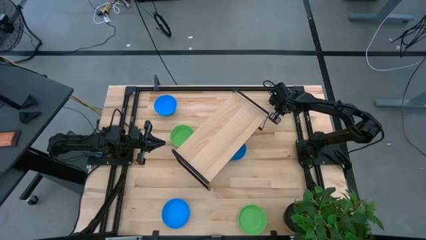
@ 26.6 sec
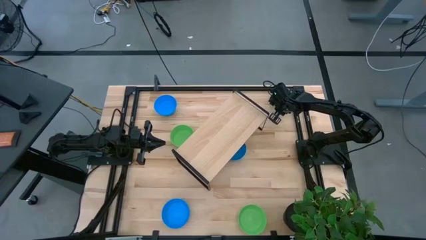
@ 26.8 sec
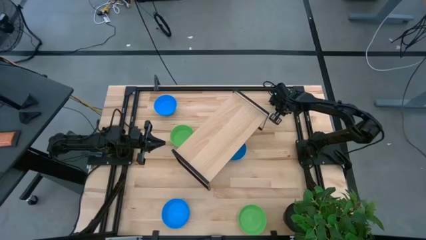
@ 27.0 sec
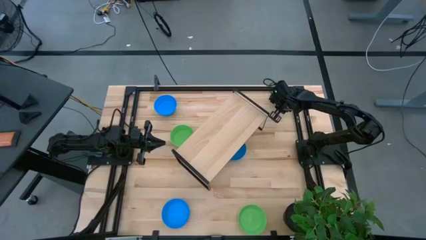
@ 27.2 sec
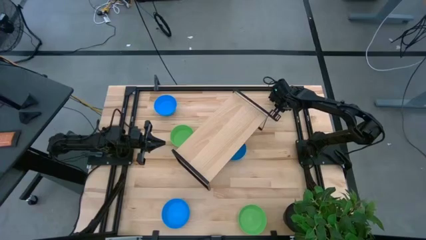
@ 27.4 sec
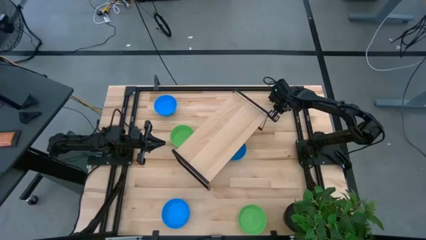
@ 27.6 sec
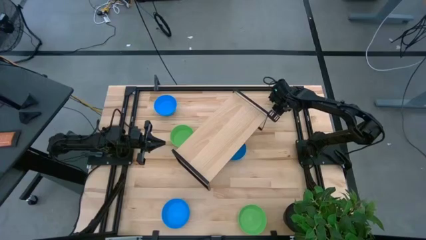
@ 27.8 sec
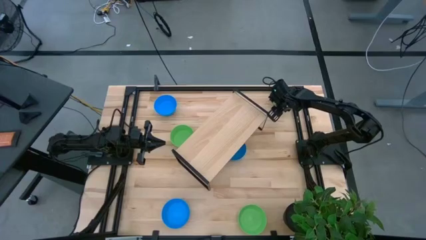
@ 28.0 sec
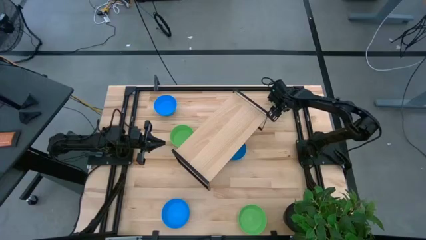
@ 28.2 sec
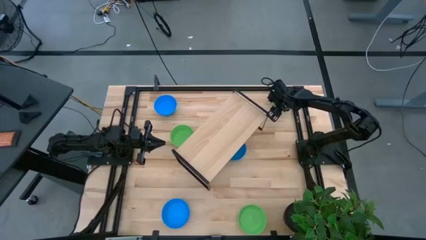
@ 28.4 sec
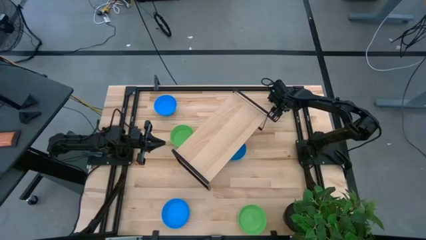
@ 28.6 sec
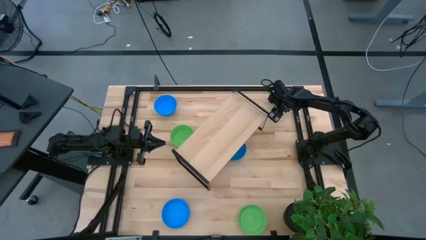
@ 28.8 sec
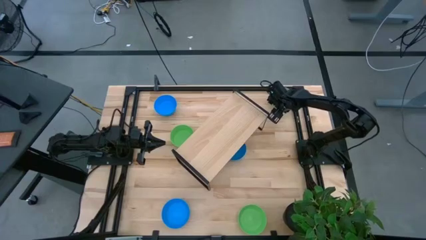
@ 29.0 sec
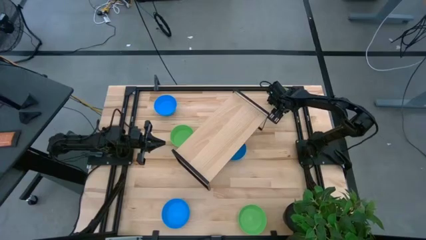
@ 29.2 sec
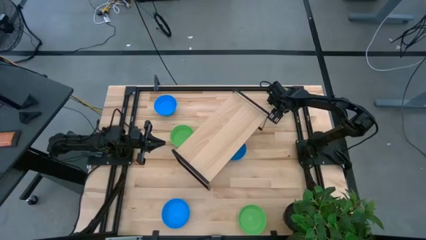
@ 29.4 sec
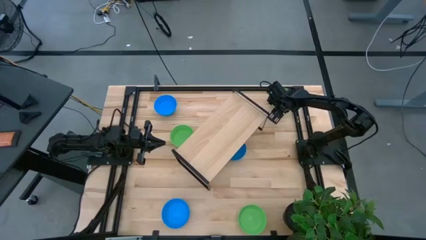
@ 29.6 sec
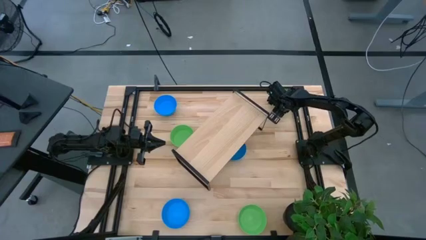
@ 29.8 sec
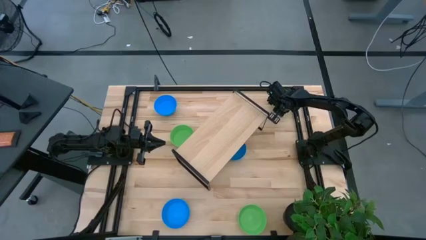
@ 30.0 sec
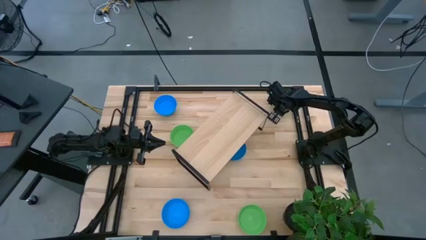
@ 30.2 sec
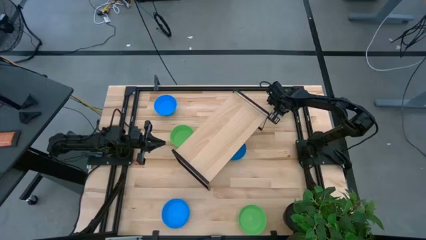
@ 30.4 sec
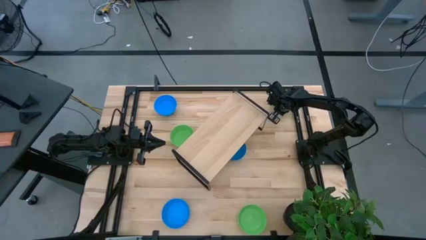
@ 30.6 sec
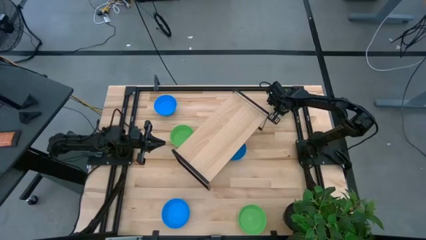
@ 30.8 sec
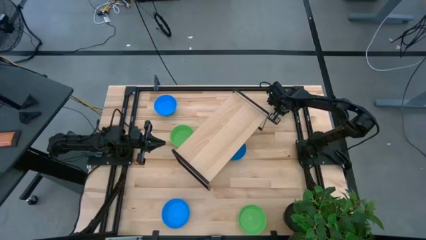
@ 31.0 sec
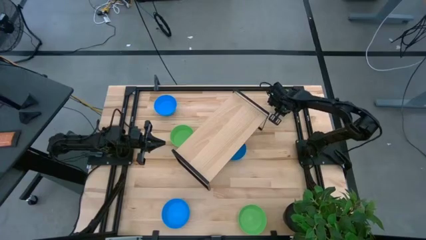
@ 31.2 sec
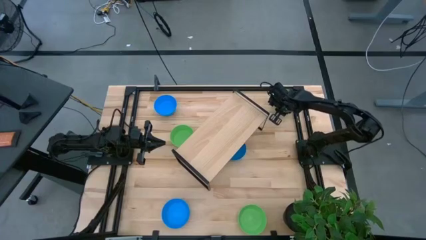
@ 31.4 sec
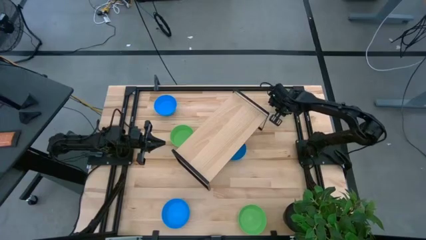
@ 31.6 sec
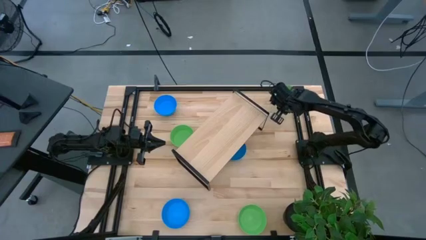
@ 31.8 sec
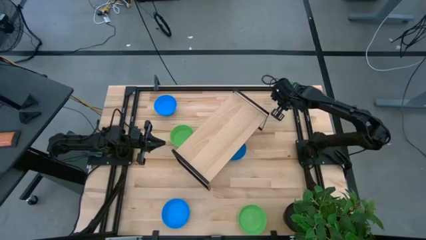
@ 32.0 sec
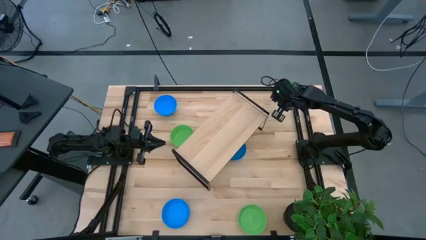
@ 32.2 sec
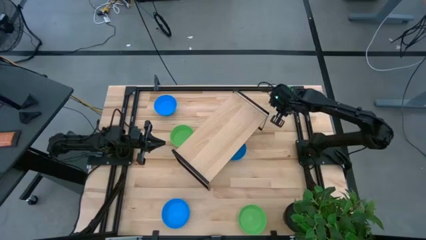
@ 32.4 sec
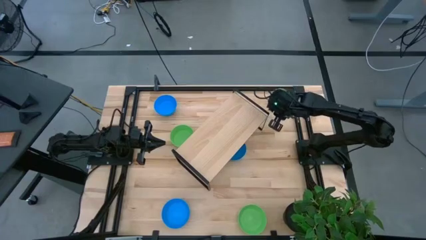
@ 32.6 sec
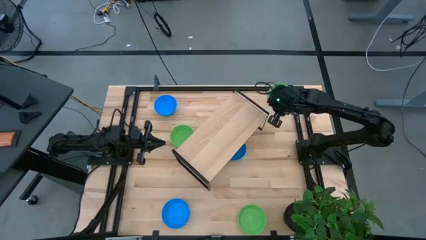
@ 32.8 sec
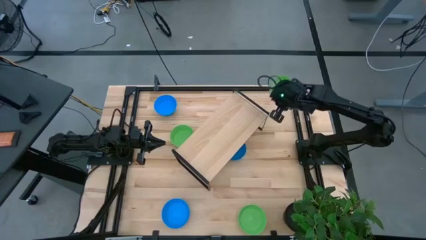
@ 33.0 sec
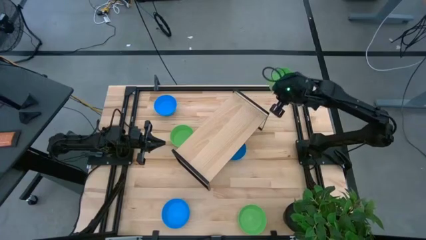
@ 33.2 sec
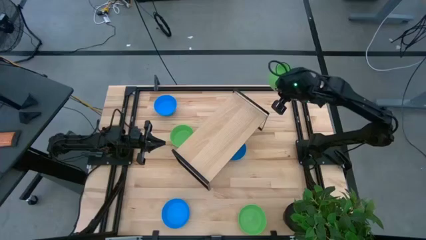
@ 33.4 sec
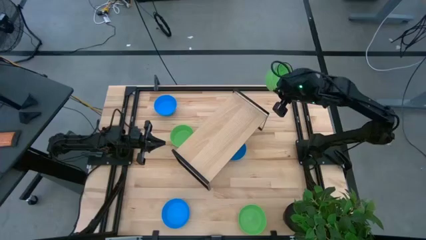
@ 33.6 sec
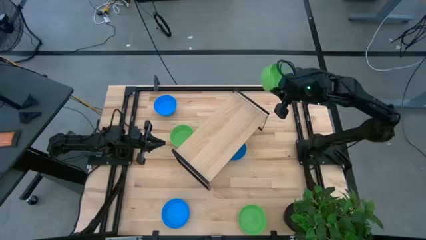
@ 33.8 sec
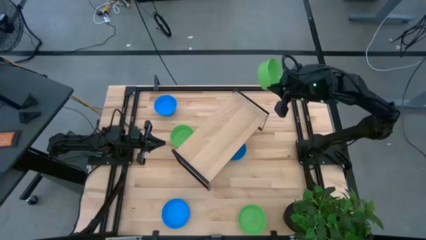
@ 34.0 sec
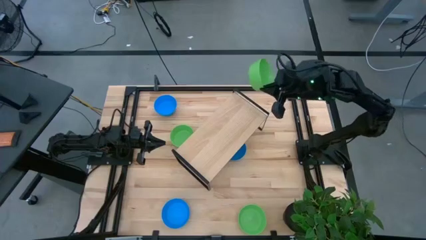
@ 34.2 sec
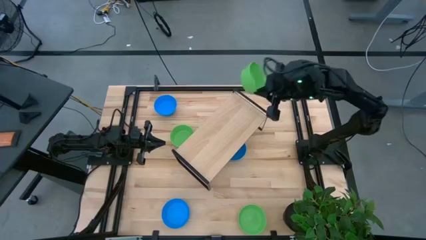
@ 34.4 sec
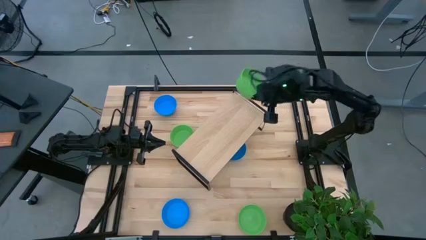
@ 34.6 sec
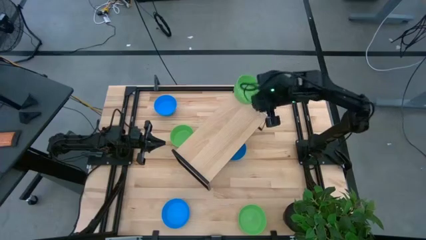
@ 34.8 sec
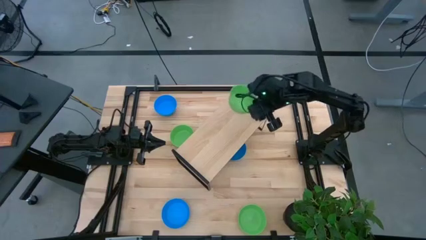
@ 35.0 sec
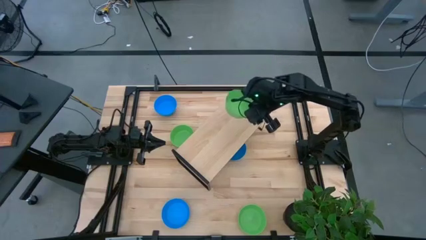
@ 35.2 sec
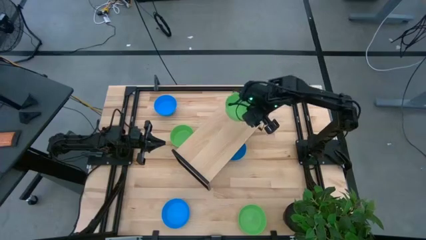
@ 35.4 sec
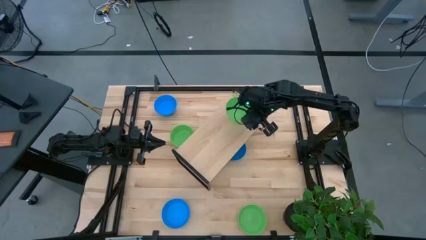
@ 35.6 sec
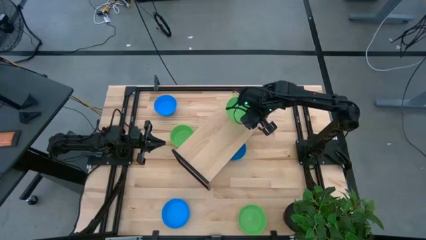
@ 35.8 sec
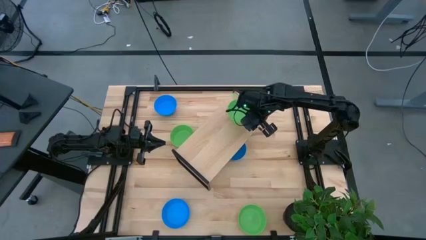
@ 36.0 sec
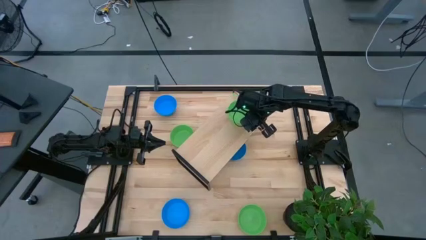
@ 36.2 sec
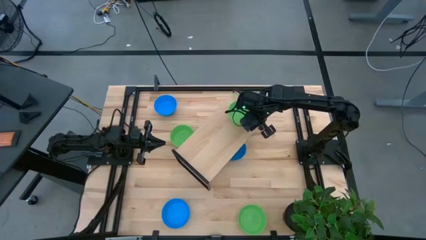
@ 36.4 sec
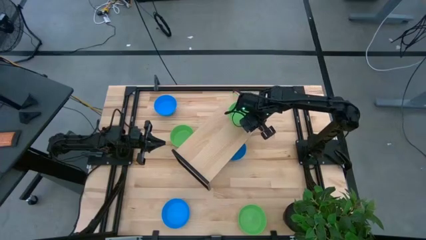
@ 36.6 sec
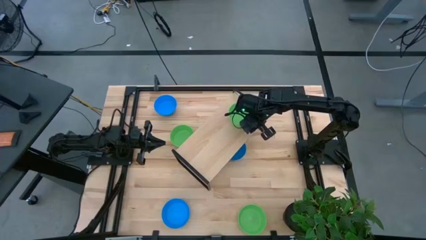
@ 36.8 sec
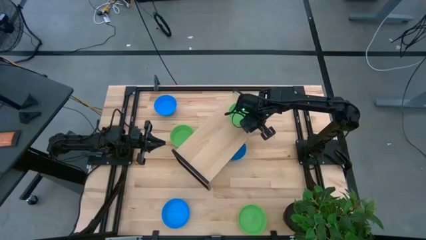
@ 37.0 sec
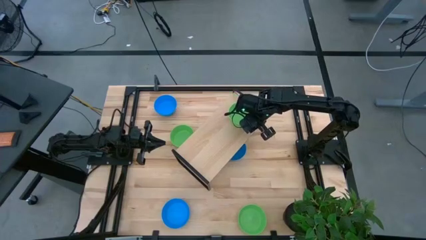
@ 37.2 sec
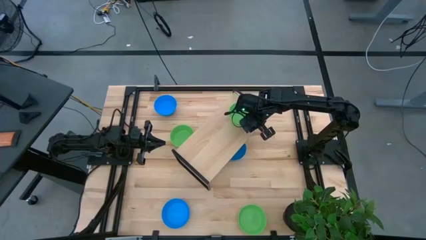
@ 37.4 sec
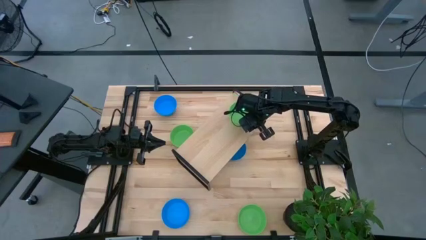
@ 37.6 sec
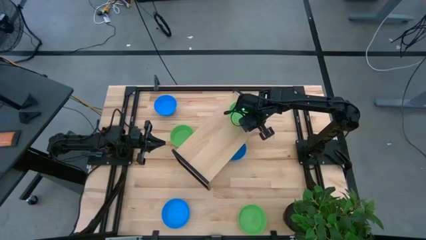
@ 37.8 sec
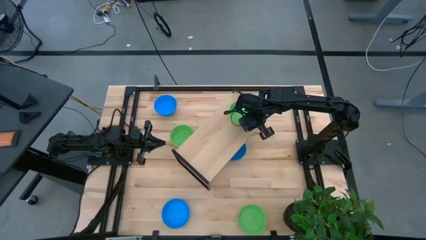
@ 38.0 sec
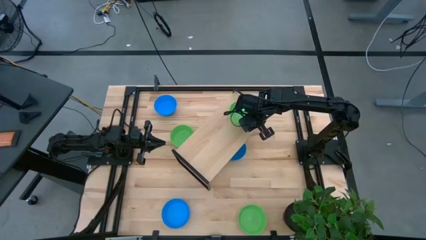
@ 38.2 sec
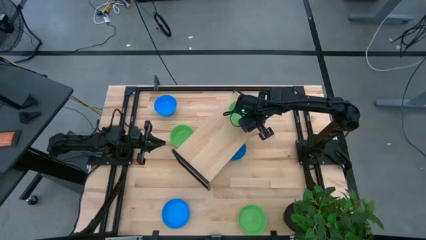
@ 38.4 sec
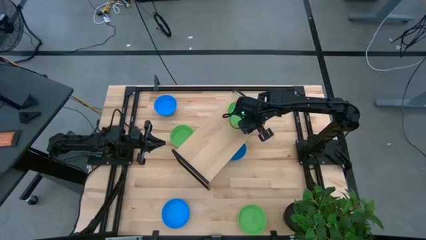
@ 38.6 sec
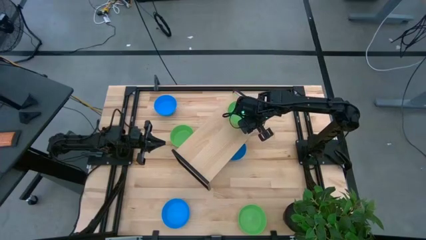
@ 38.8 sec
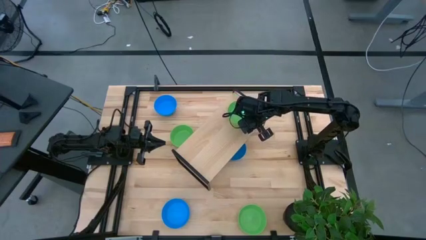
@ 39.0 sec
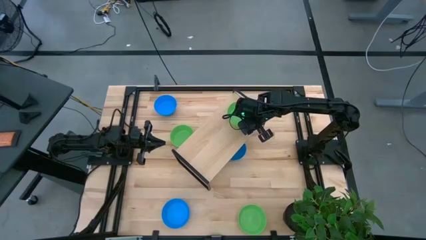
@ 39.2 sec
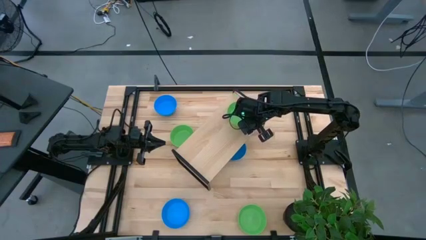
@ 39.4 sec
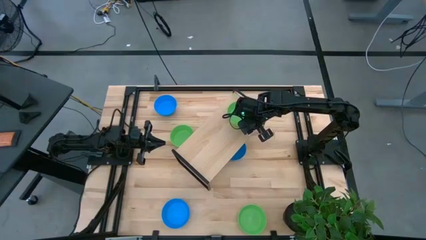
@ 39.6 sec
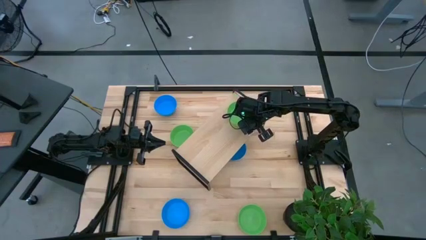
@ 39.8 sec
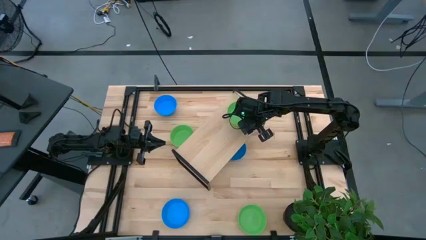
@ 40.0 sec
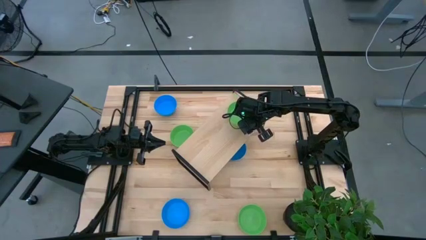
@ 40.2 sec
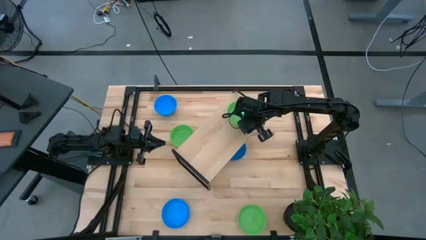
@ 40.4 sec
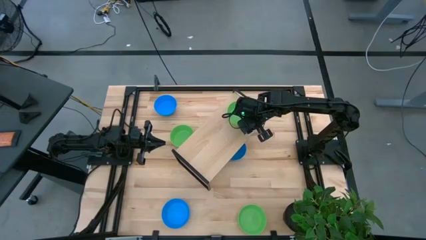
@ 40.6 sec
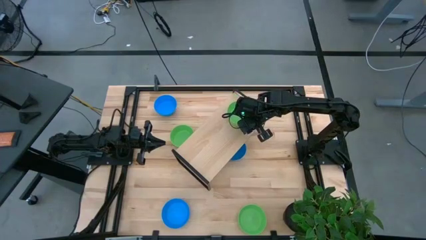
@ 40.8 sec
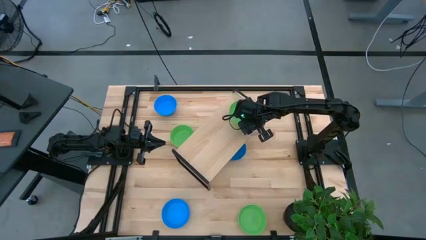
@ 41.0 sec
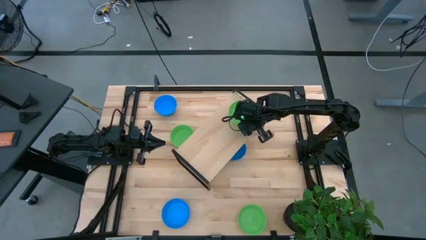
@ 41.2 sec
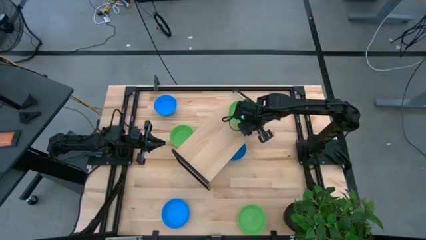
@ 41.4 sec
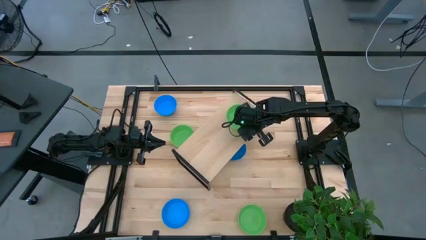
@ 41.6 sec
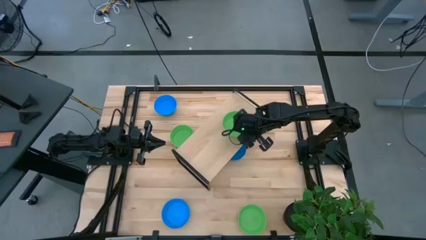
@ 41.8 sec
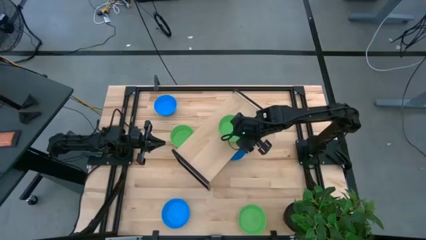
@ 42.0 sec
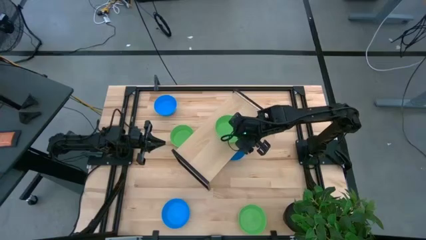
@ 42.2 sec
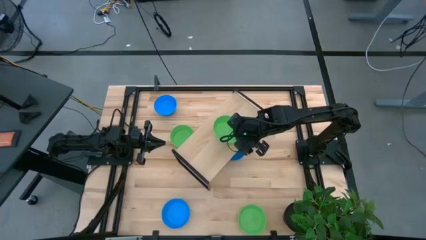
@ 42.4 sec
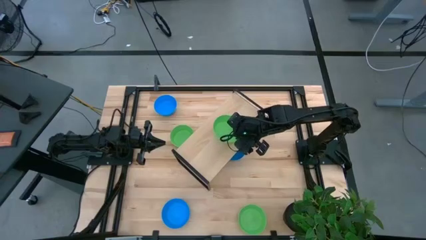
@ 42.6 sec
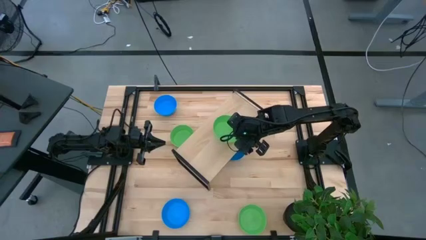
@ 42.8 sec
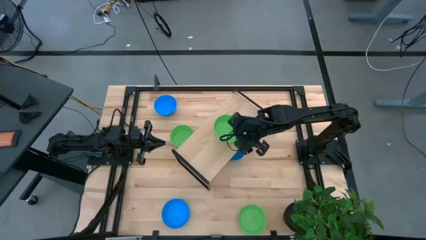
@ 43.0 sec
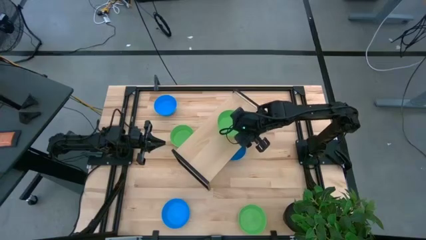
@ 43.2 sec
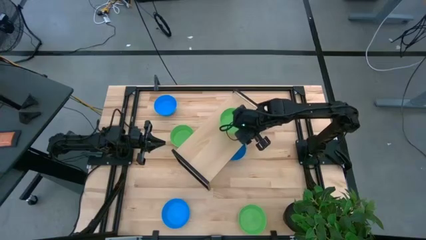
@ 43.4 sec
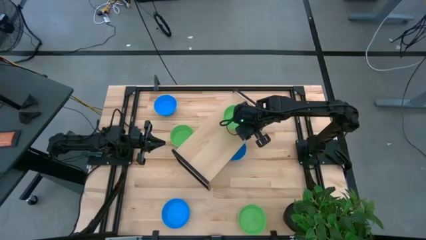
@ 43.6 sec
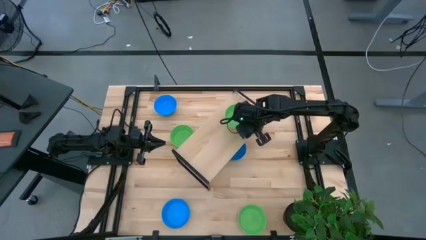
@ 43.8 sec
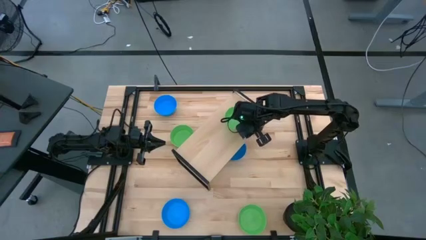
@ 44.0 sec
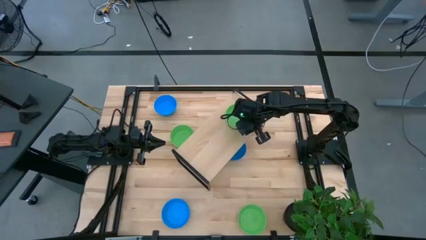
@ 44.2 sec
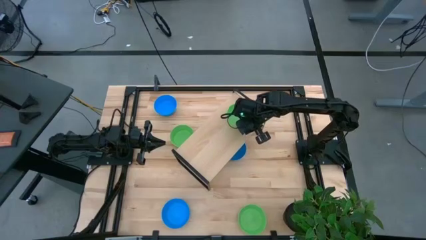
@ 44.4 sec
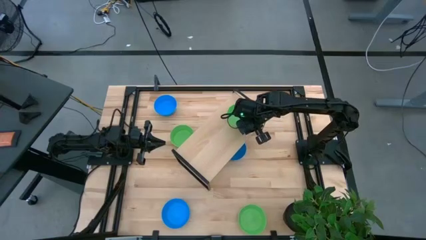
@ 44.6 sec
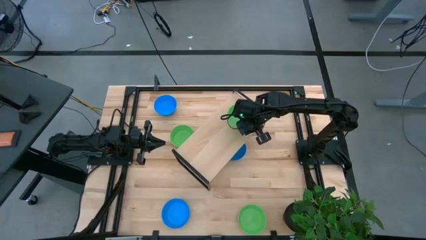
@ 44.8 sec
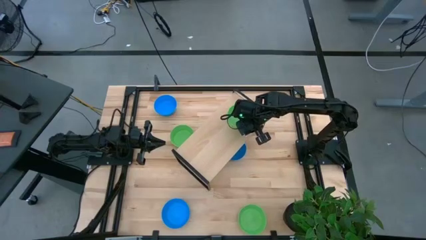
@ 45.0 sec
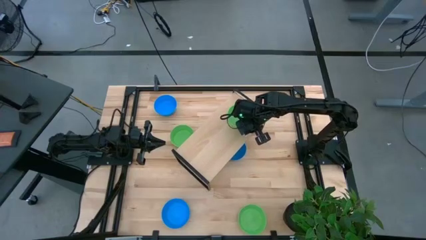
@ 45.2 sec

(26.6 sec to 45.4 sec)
Task: Pick & Place Mini bowls
Put the top green bowl on the shelf
